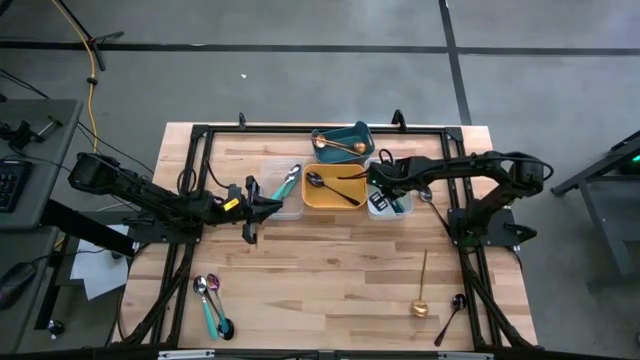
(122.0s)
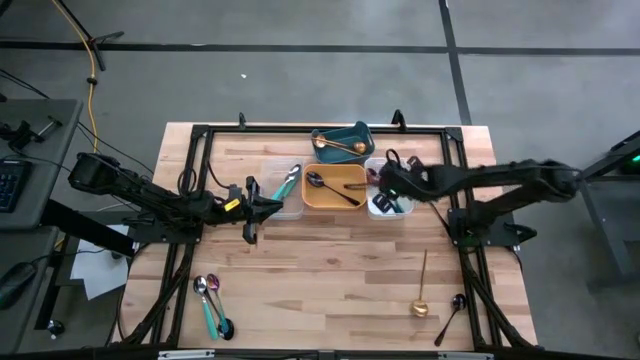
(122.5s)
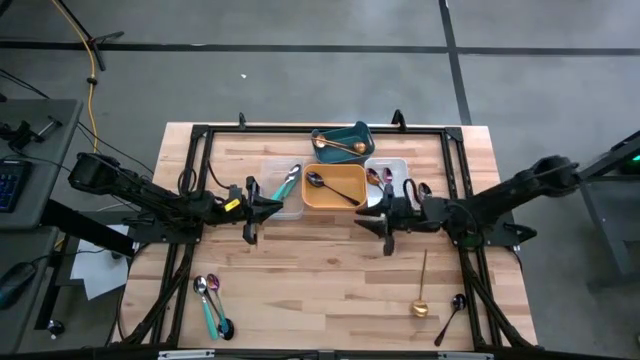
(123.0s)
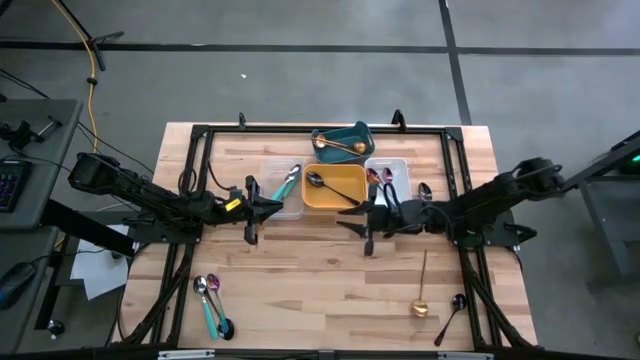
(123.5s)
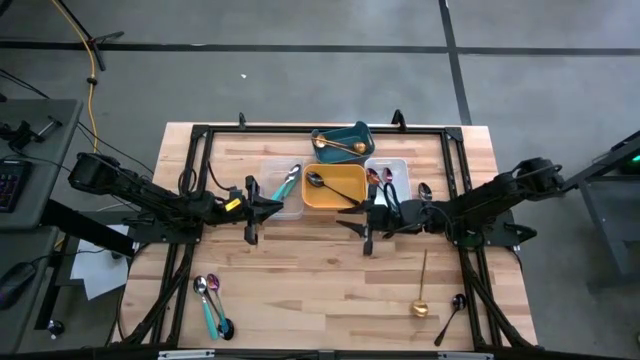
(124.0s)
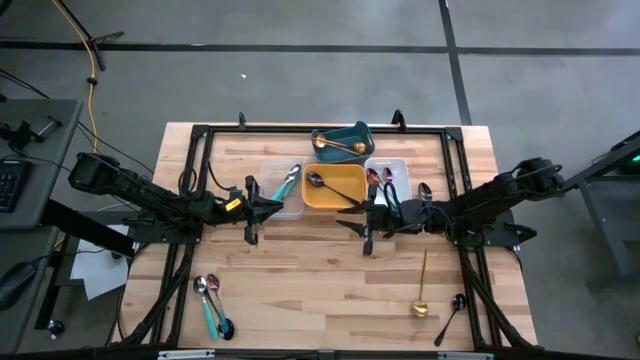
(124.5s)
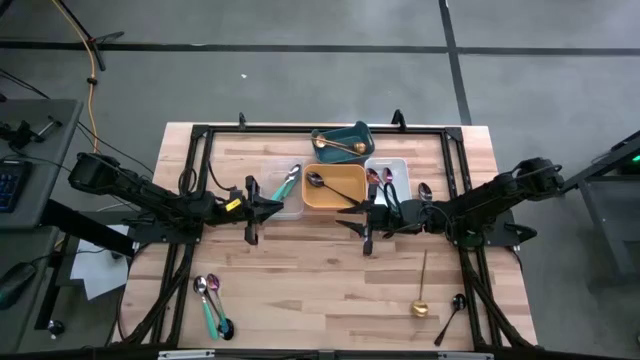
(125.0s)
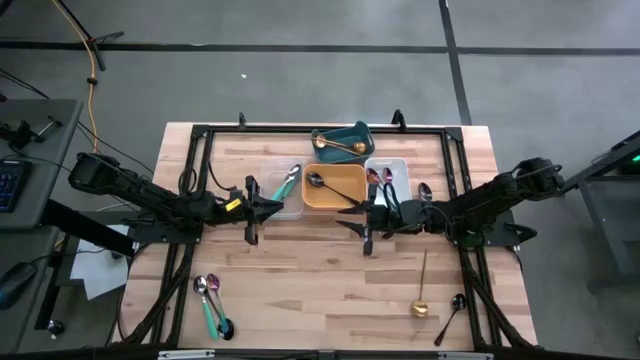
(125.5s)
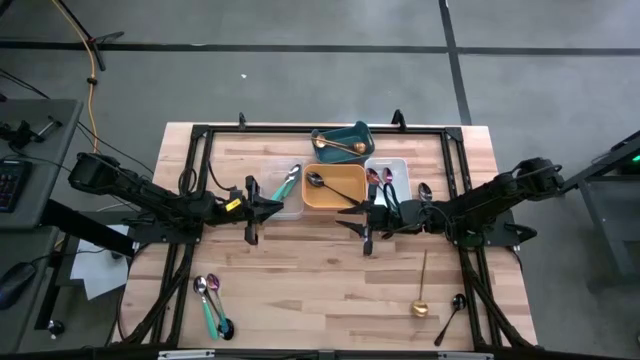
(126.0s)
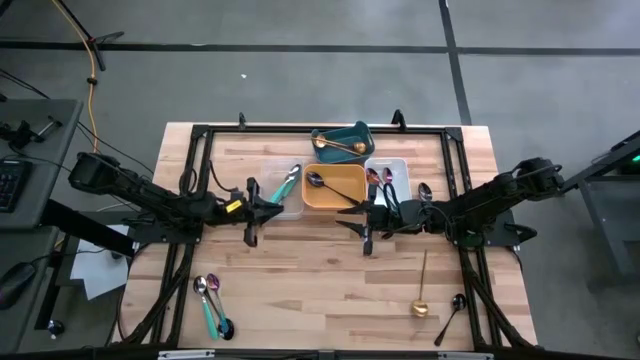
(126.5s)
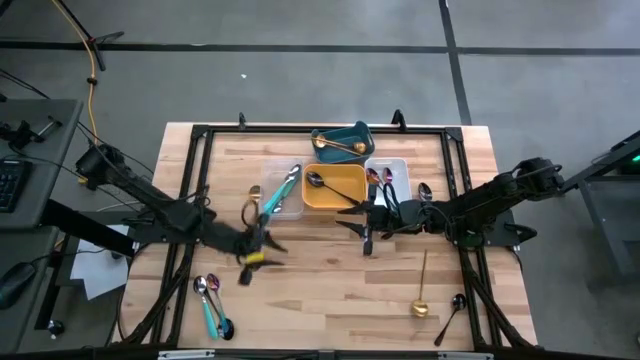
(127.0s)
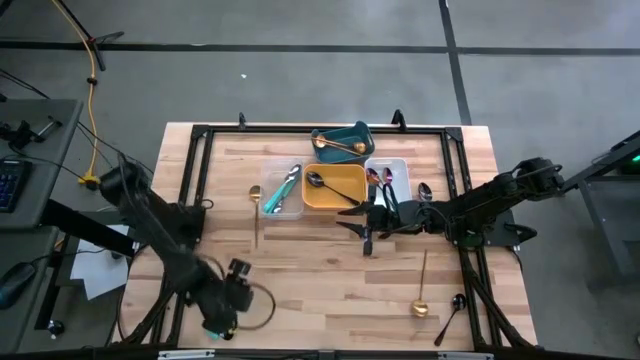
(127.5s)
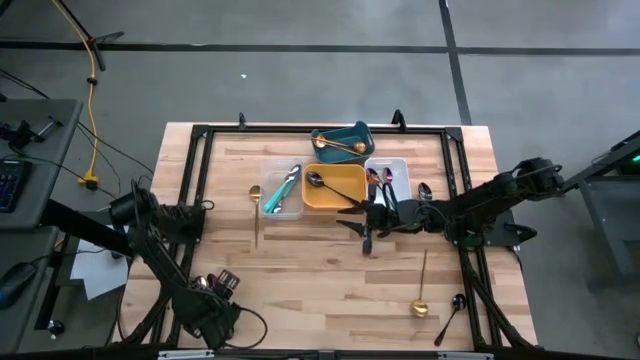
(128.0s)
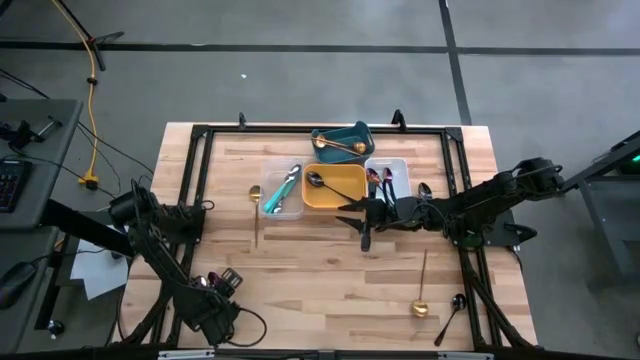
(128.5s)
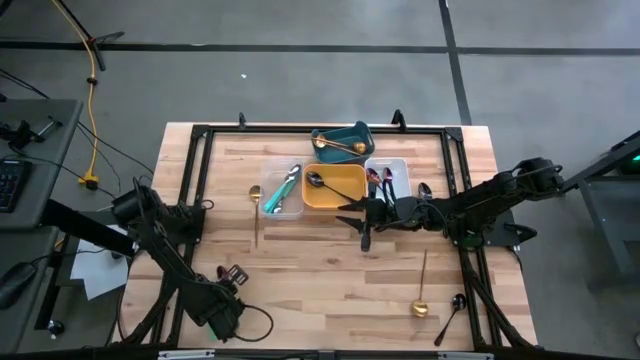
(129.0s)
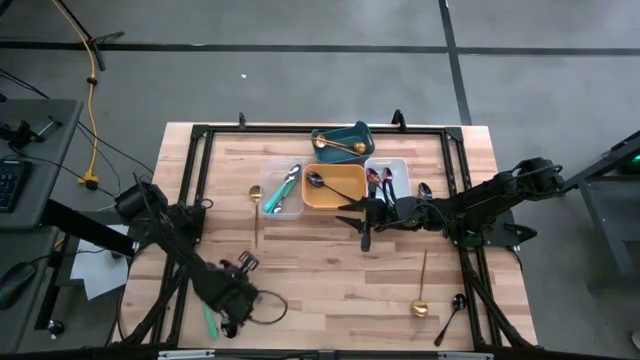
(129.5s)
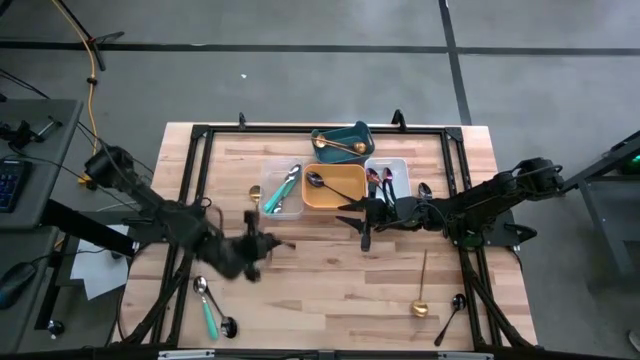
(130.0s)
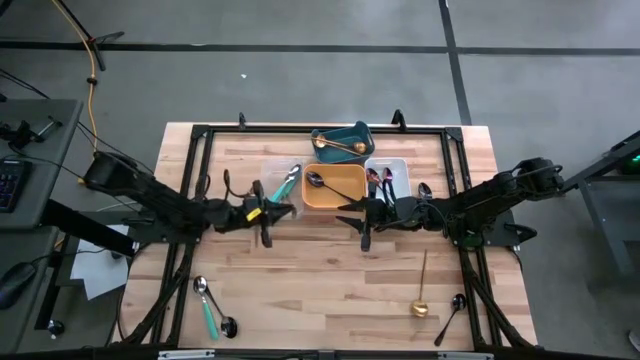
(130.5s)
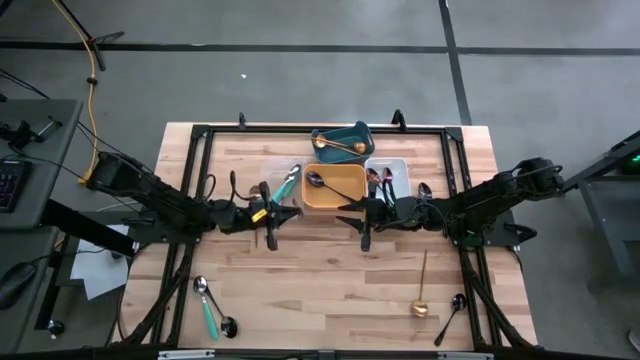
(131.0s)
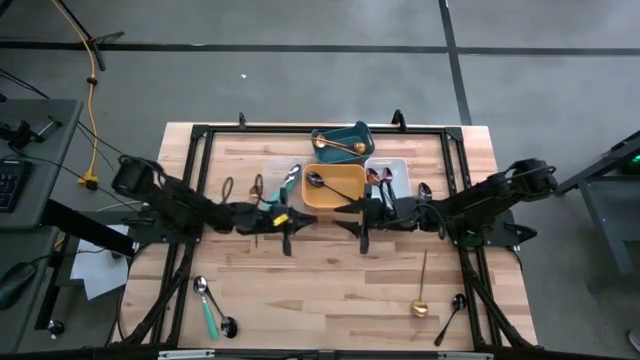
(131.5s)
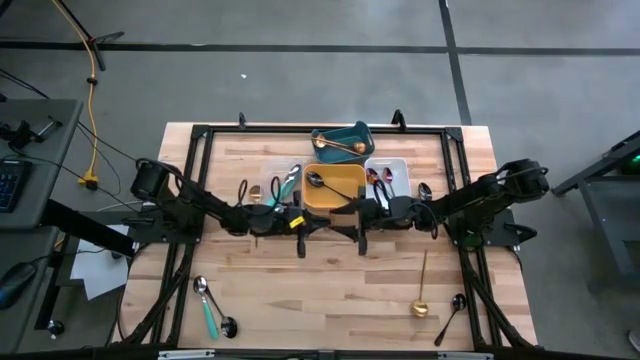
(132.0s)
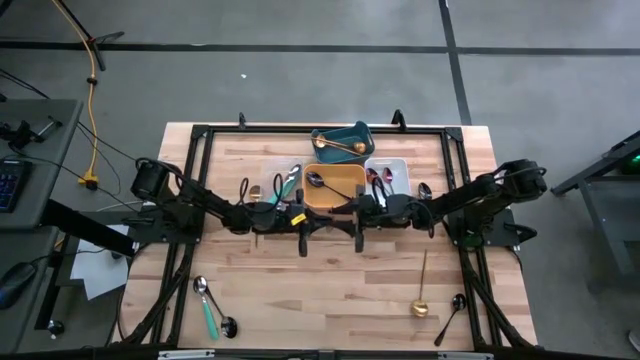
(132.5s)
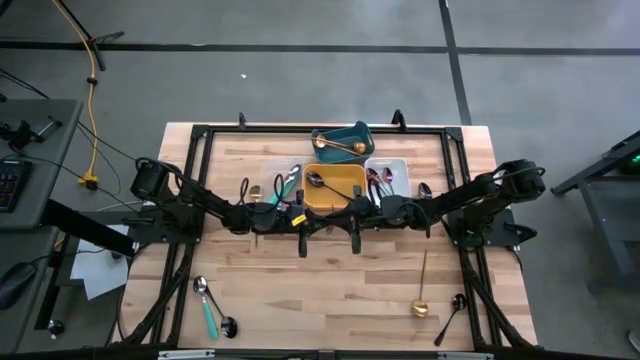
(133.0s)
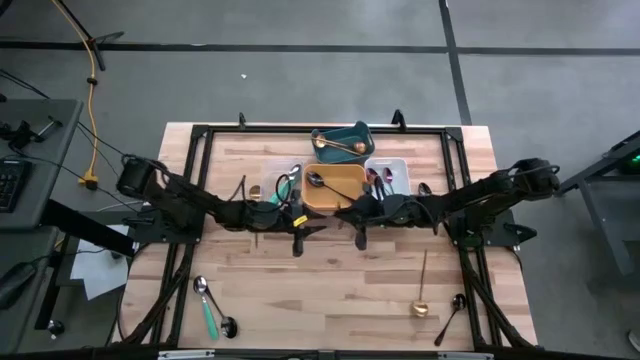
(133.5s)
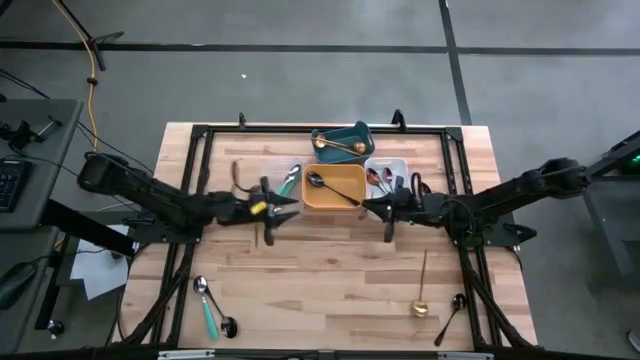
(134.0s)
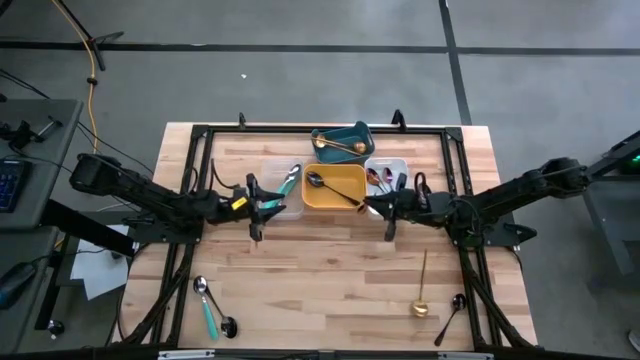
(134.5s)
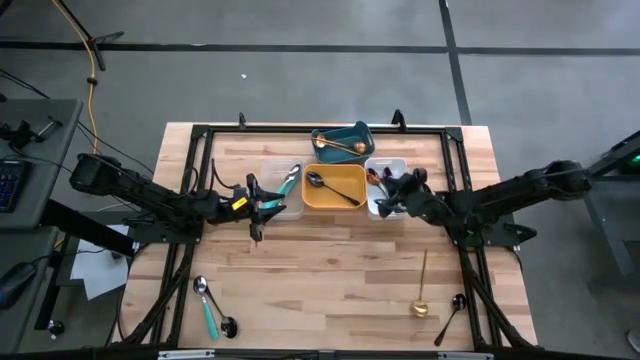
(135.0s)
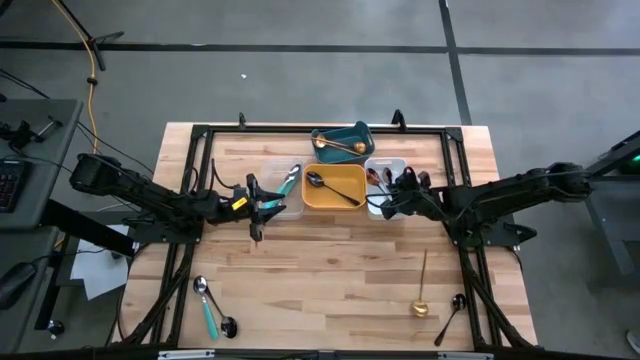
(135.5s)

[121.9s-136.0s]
Task: Sort silverware by color (type)
Put the distorted-color spoon into the white bin

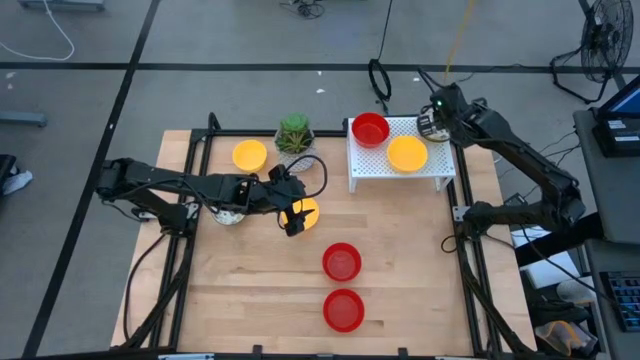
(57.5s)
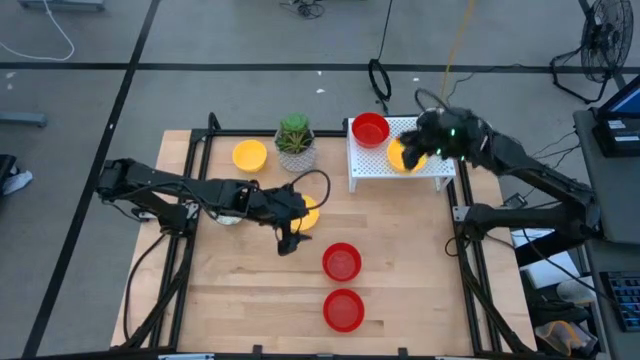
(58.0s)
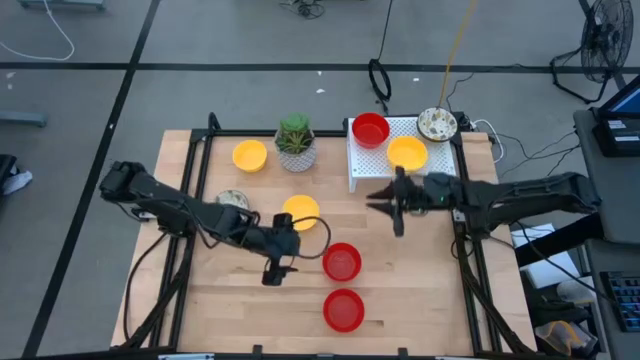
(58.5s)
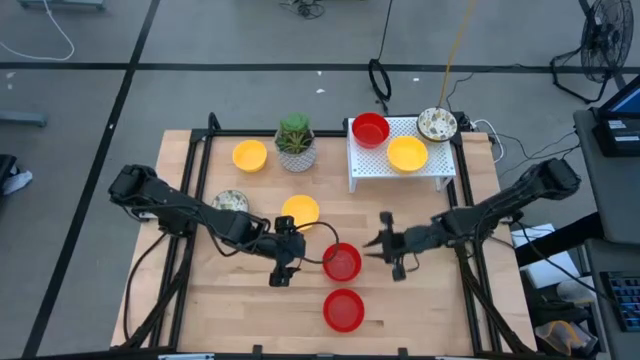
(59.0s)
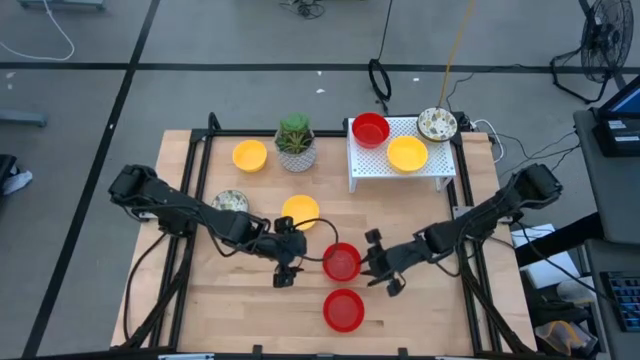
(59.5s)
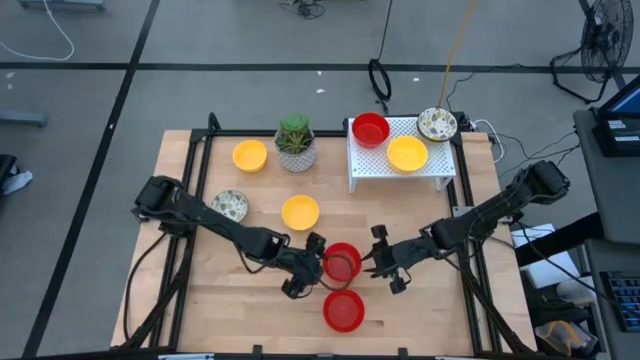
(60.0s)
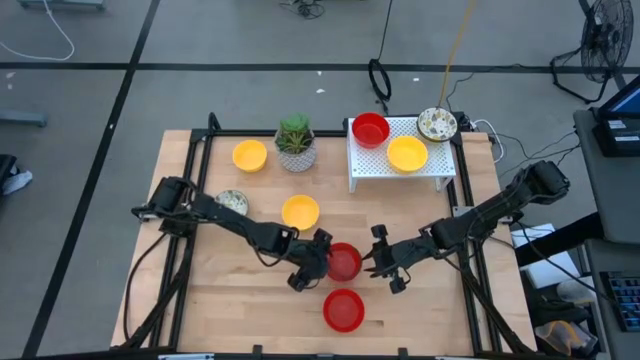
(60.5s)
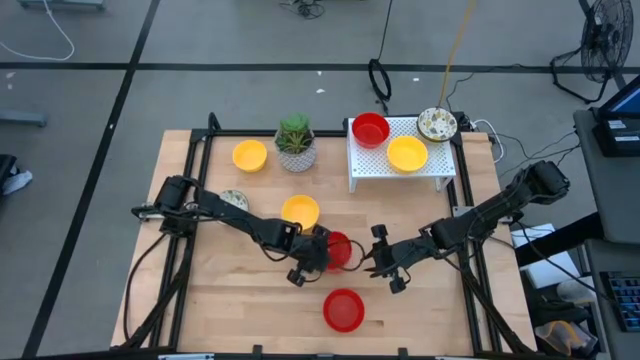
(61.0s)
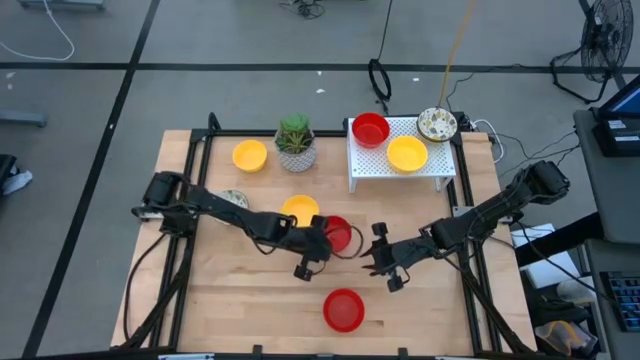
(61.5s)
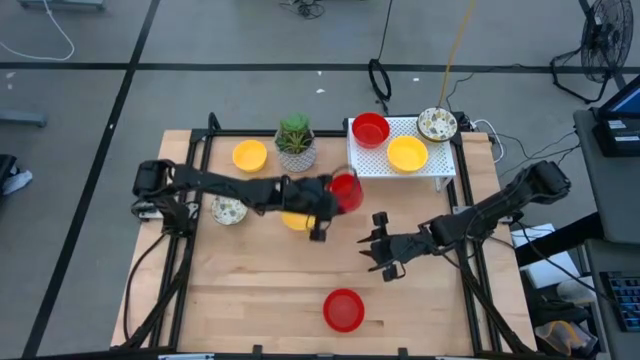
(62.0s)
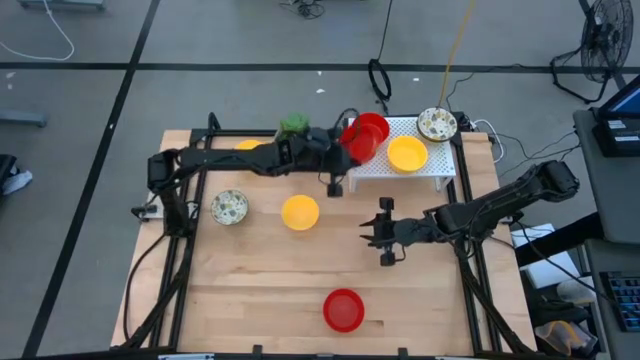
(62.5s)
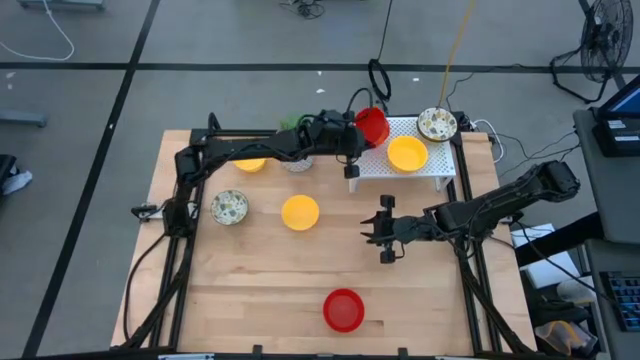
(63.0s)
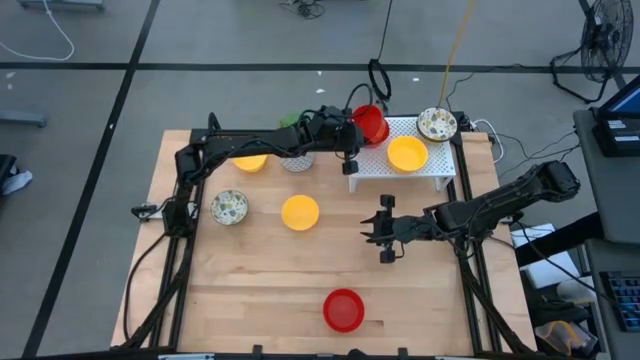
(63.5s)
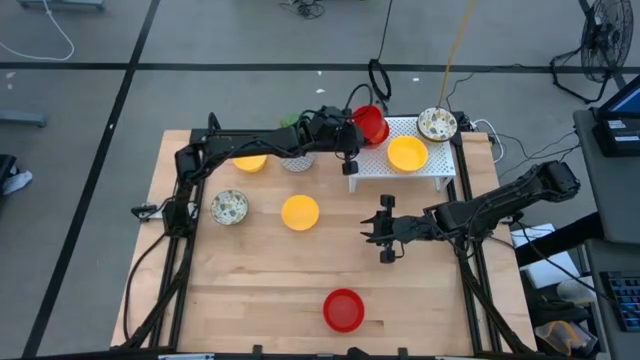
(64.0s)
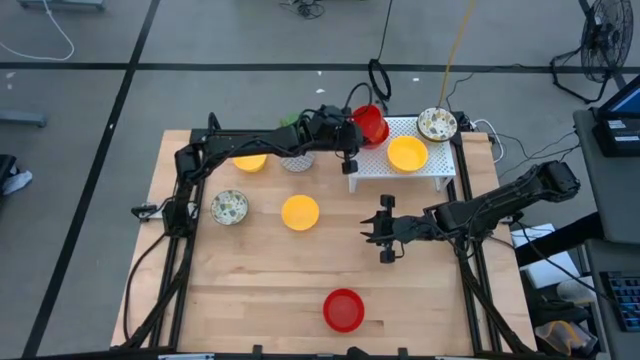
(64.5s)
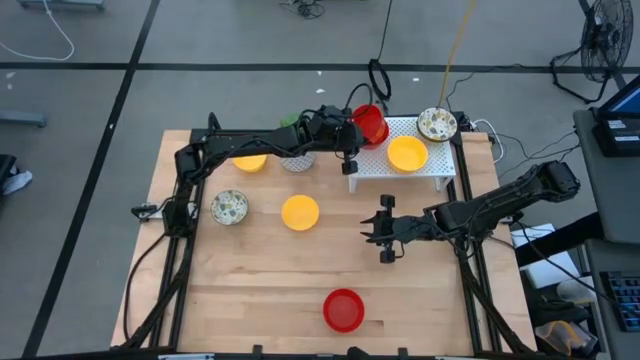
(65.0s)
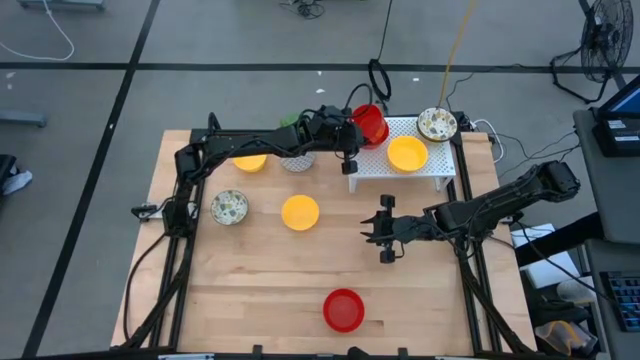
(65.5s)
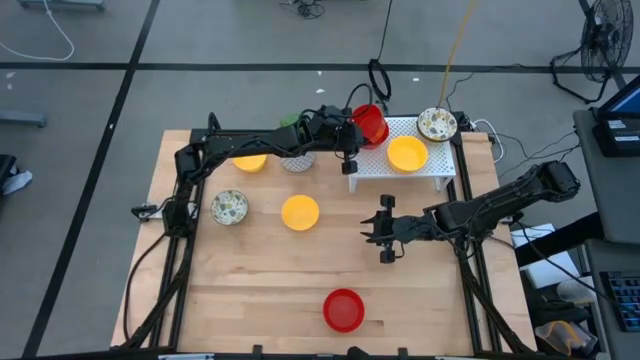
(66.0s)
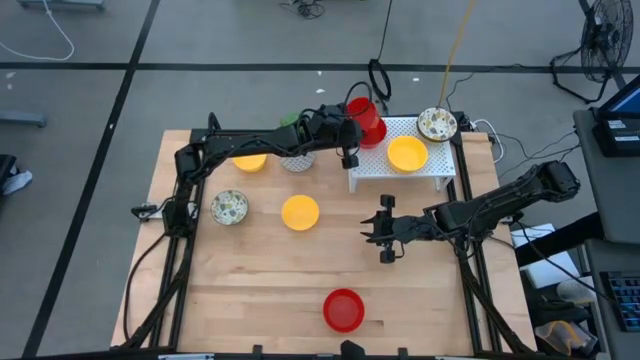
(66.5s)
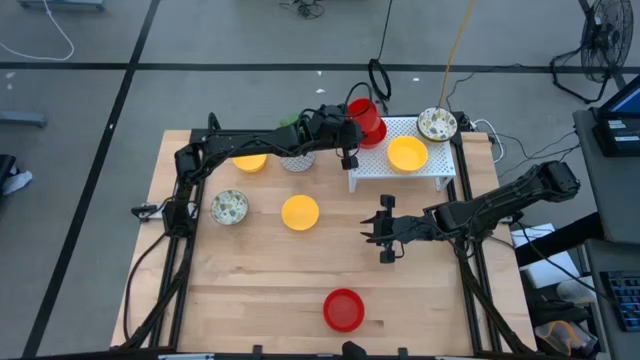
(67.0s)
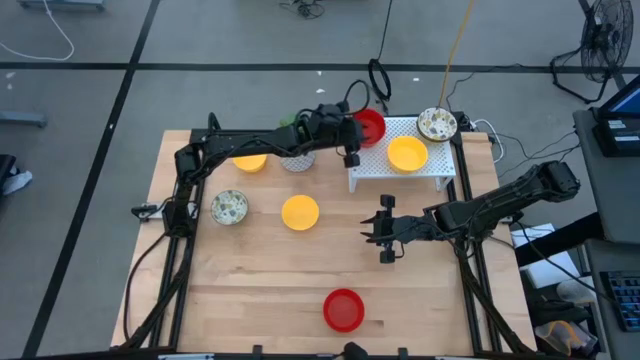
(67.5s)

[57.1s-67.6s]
Task: Pick & Place Mini bowls
Stack the red bowl on top of the other red bowl on the shelf
